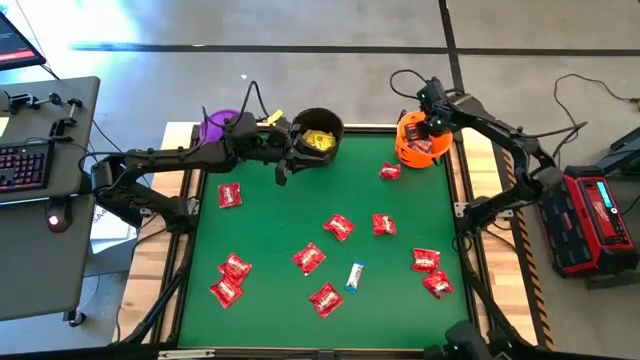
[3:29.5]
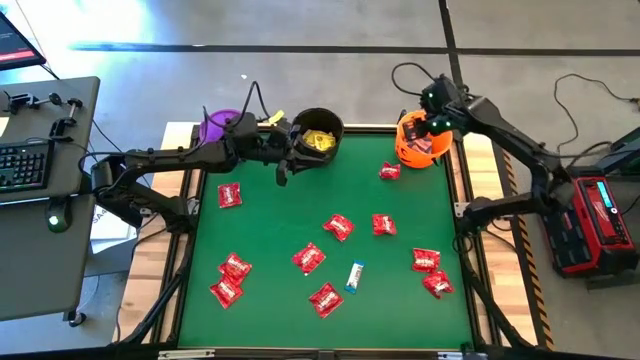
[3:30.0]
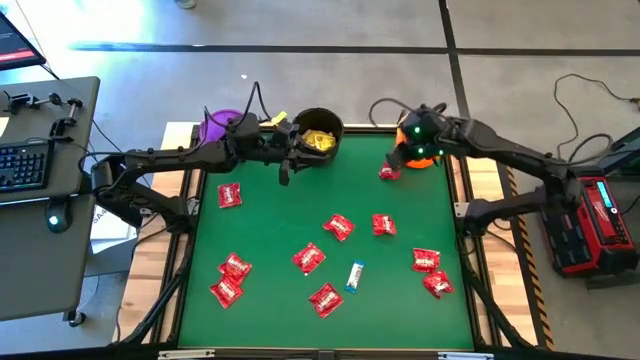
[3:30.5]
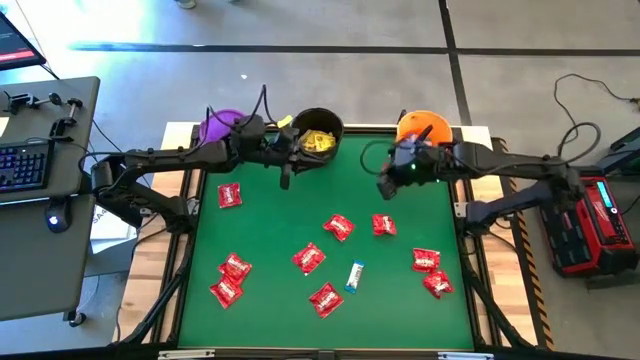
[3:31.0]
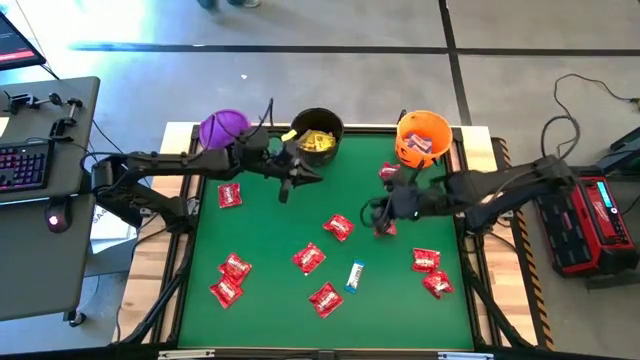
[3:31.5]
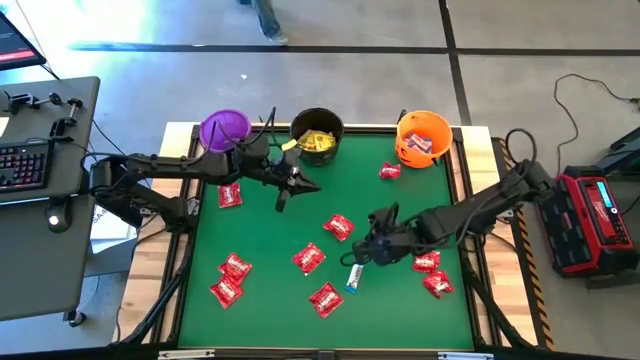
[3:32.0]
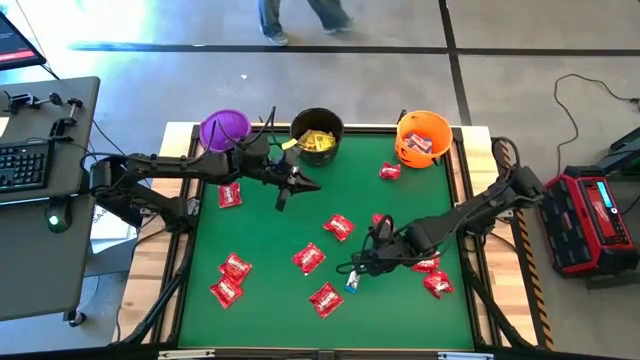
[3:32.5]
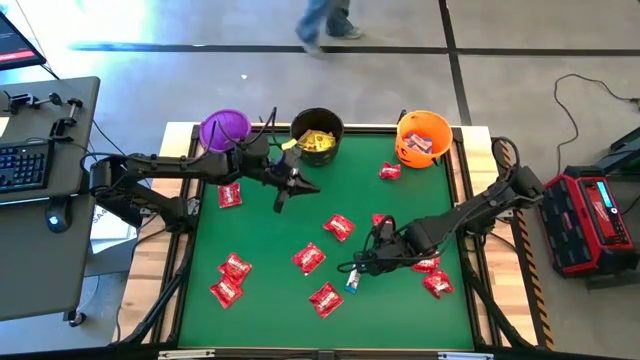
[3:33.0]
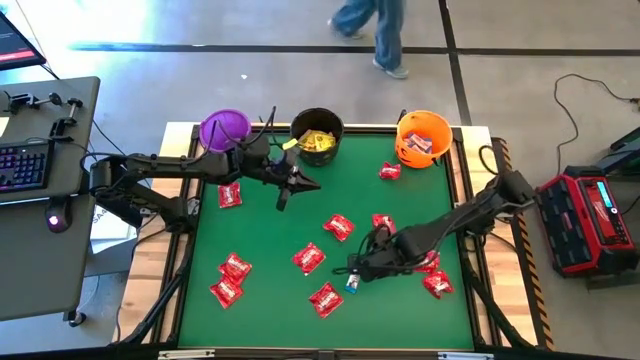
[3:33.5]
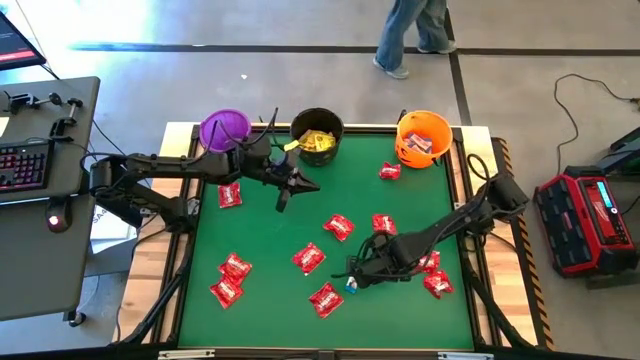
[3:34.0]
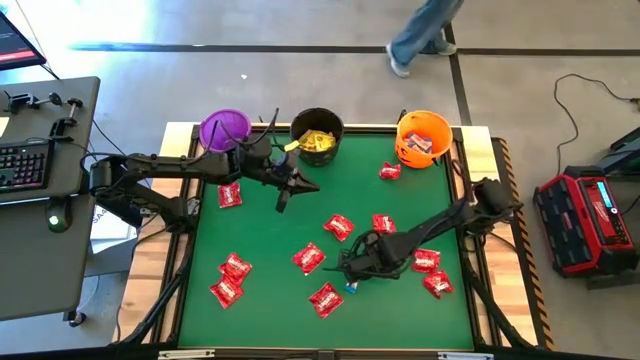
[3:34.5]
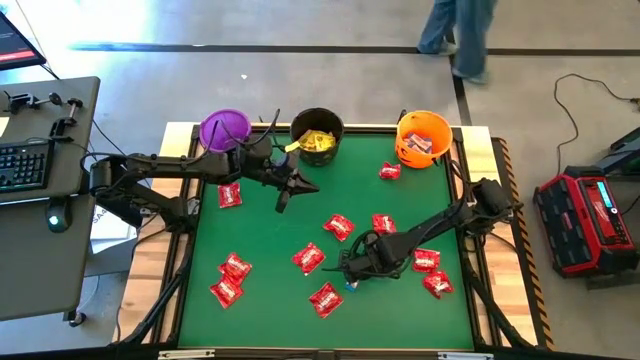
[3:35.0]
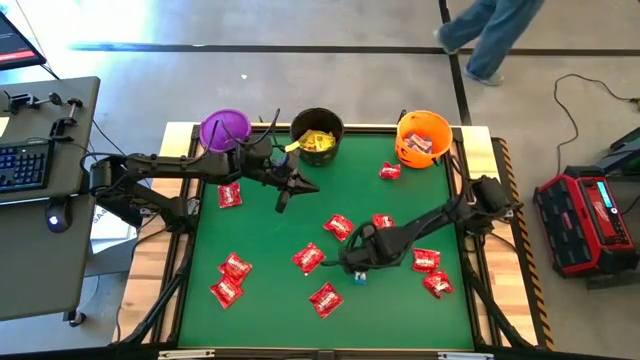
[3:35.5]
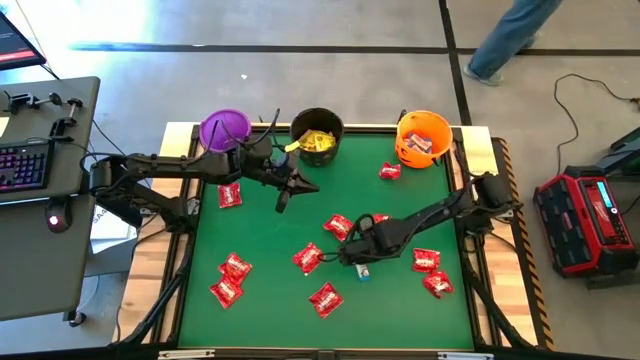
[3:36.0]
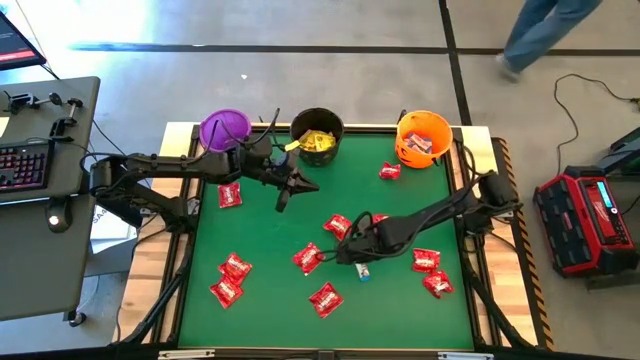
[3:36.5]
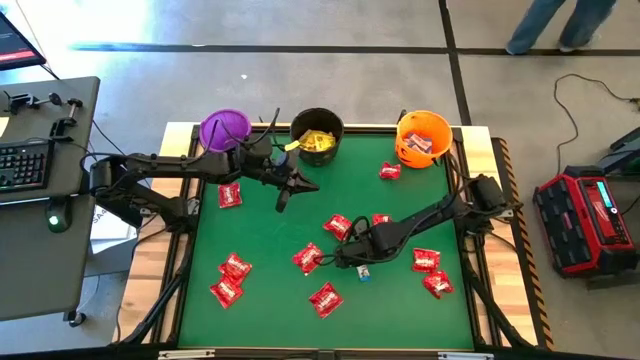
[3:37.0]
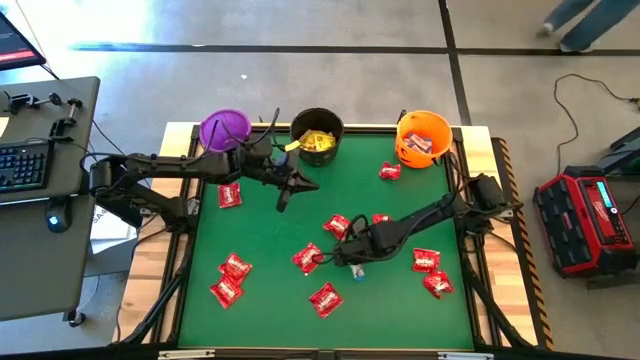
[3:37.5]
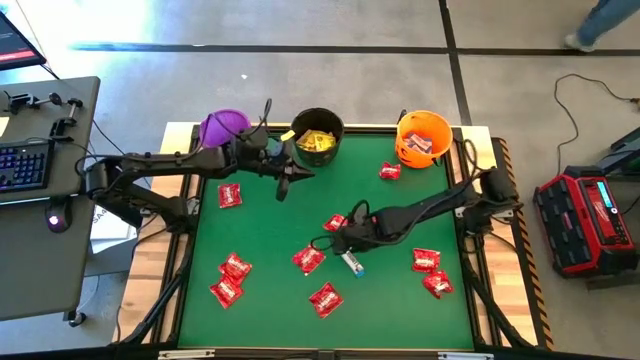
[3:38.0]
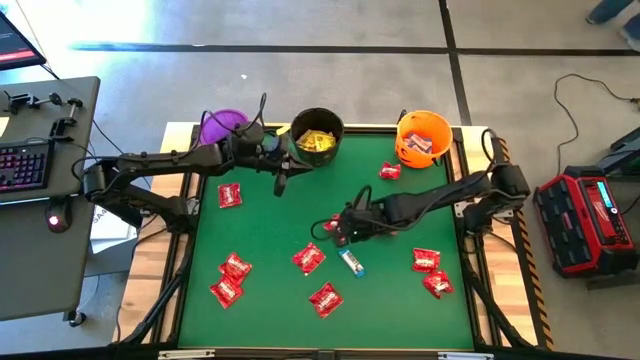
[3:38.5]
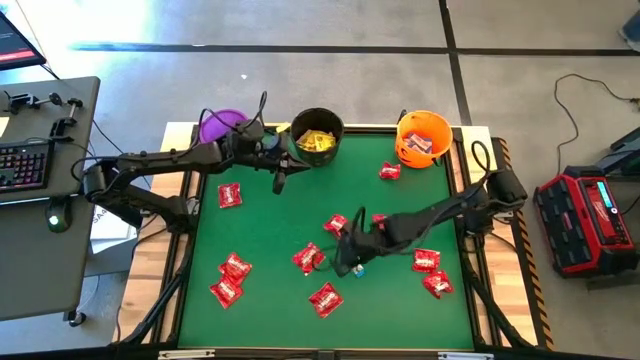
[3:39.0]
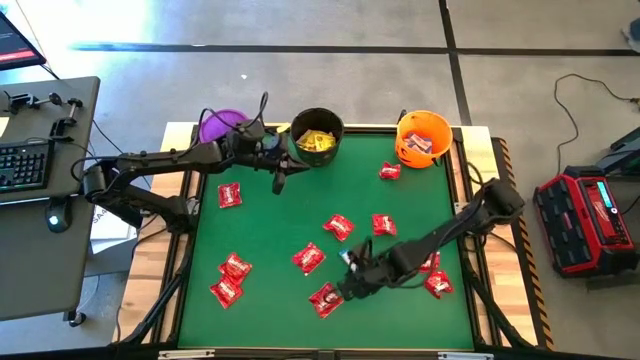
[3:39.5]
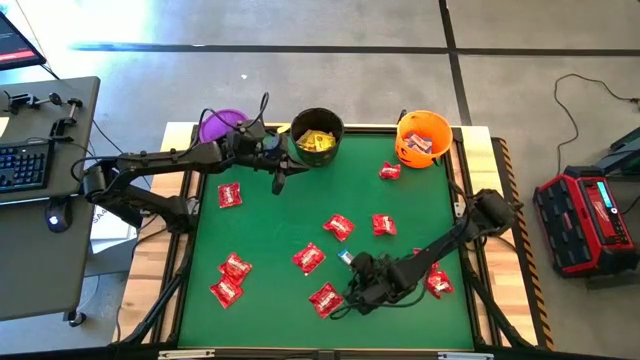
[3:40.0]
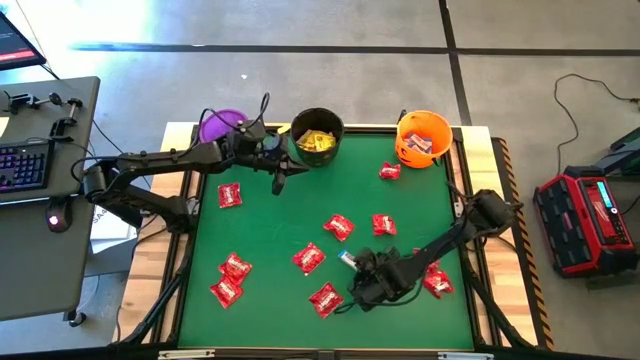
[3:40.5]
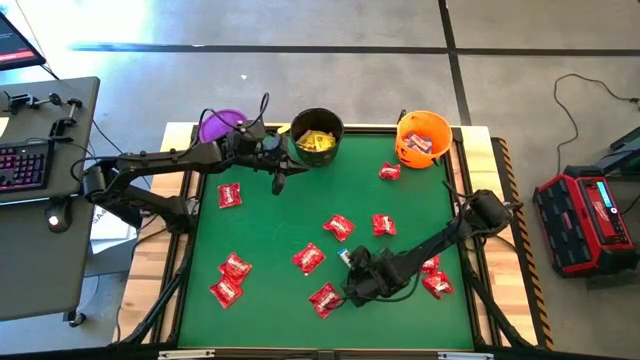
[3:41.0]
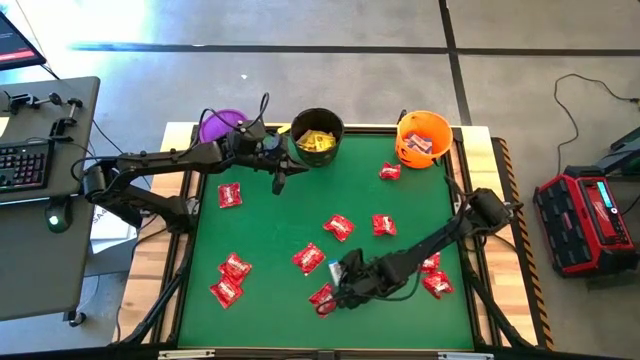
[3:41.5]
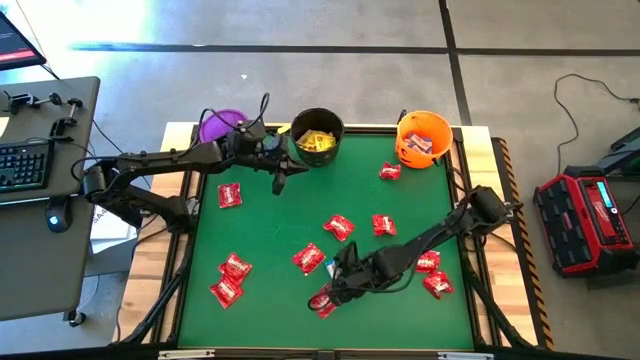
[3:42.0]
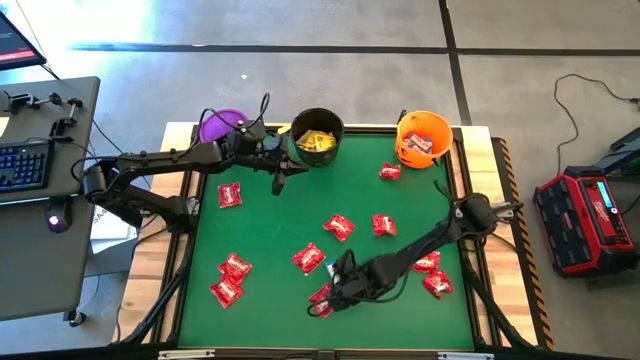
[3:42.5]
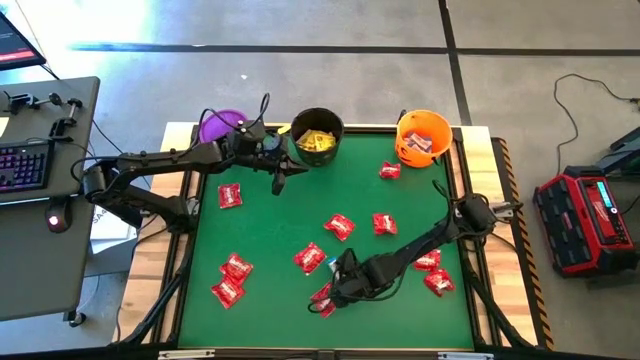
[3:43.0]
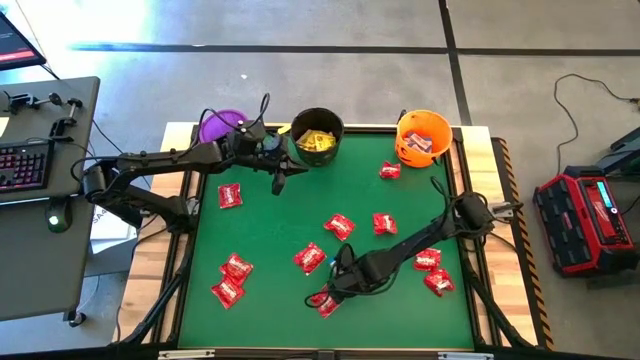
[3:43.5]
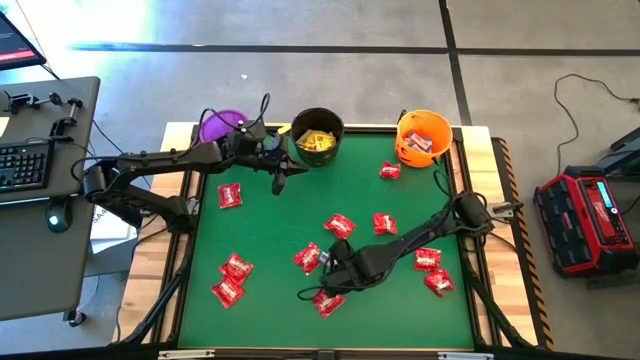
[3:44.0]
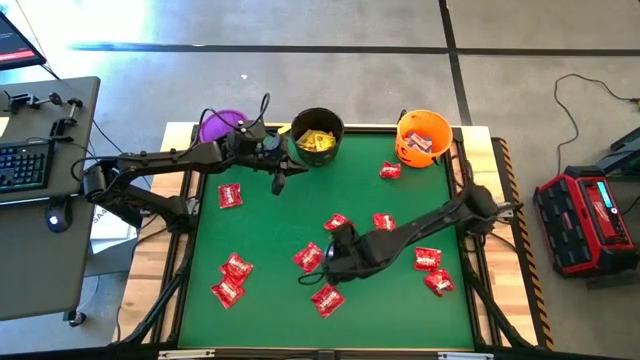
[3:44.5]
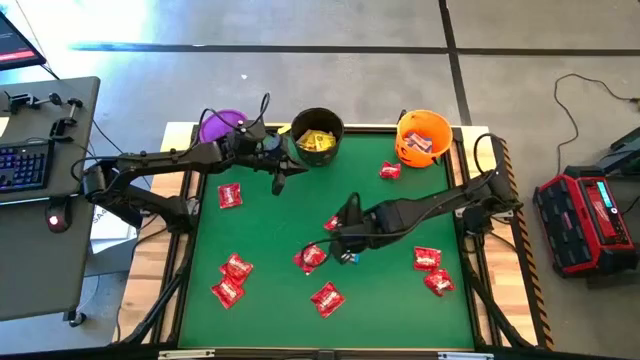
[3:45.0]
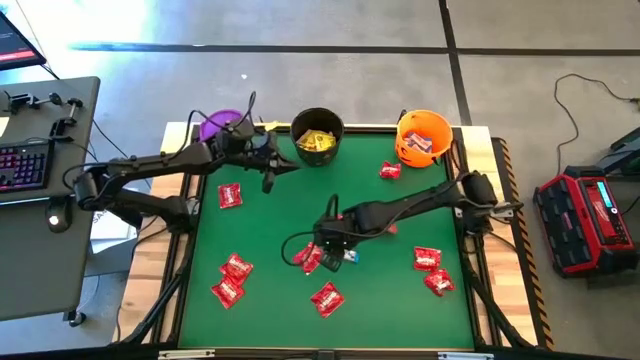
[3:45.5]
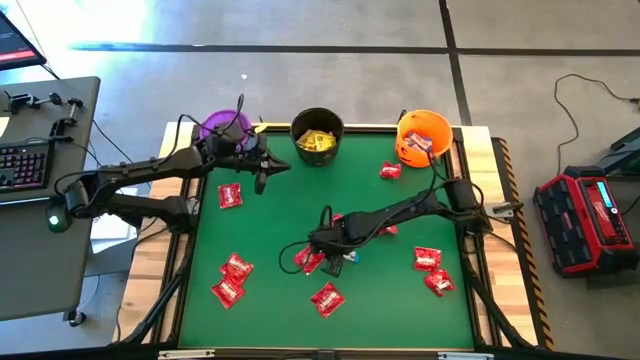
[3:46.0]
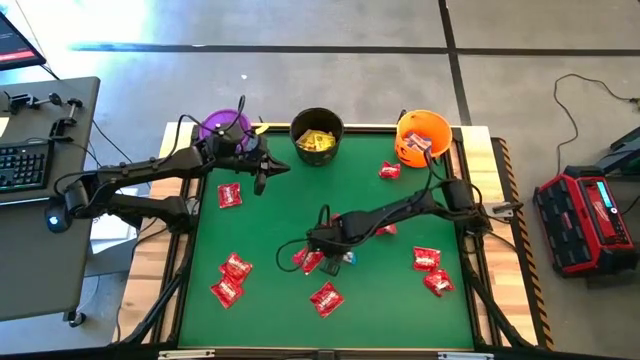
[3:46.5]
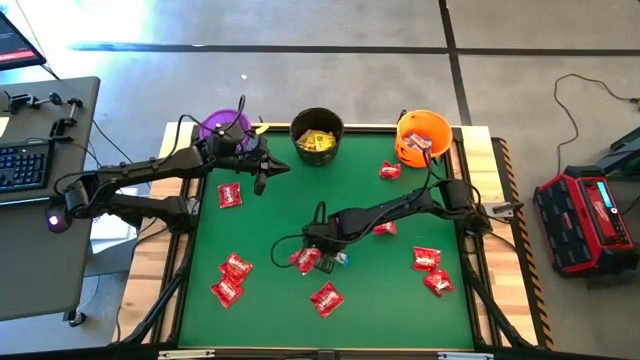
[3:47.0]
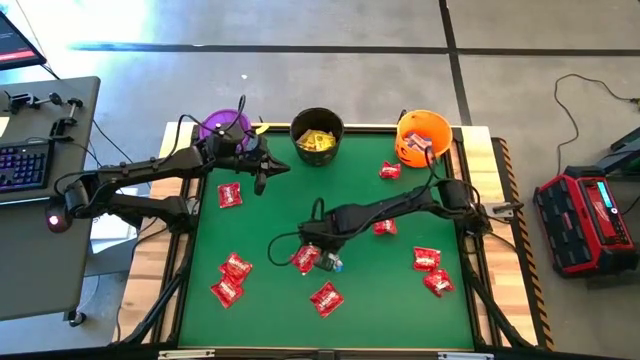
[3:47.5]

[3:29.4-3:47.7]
Task: Sort candy by brand, put in halloween buckets
Put the blue chocolate bar into the orange bucket

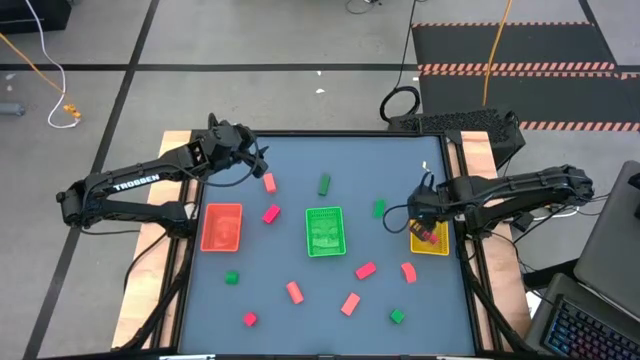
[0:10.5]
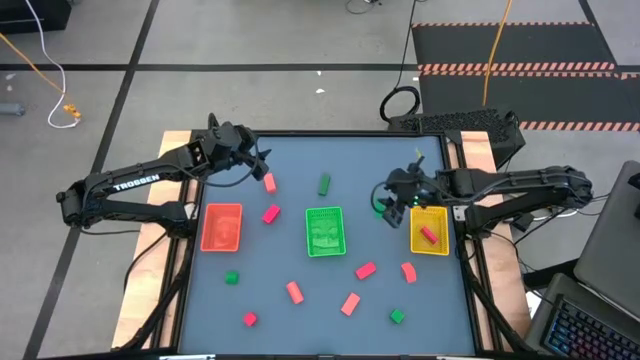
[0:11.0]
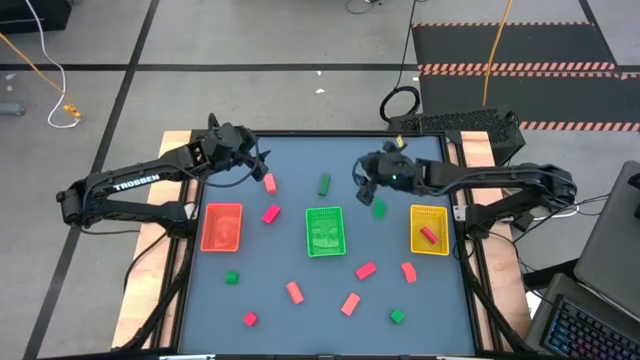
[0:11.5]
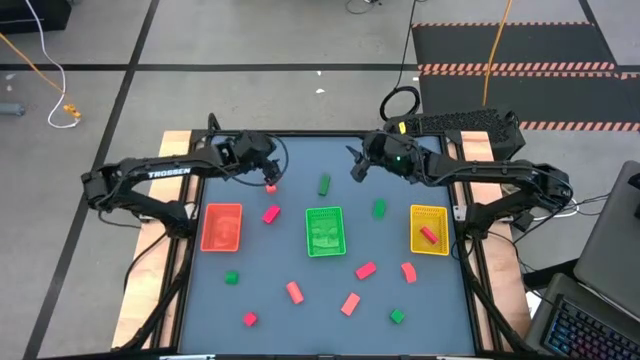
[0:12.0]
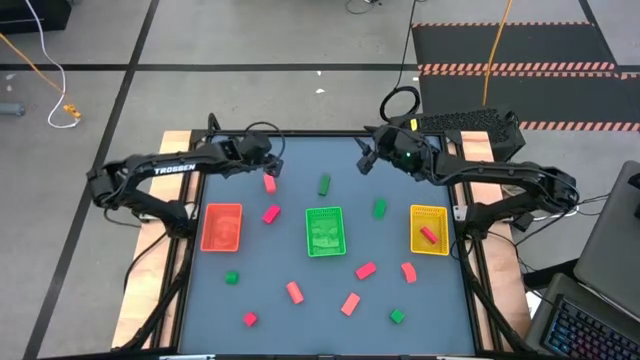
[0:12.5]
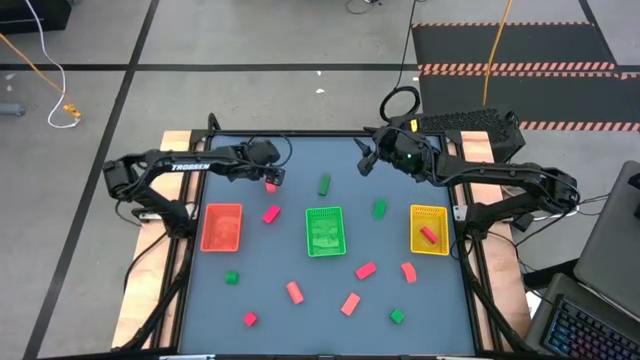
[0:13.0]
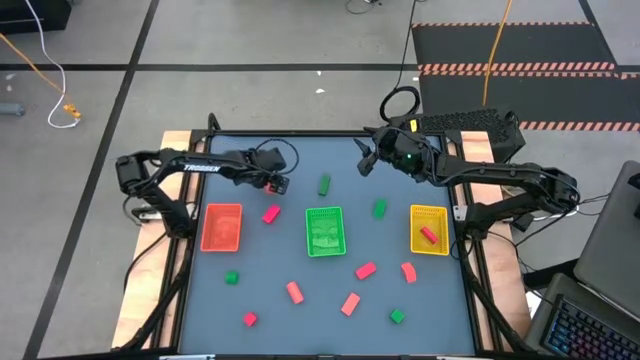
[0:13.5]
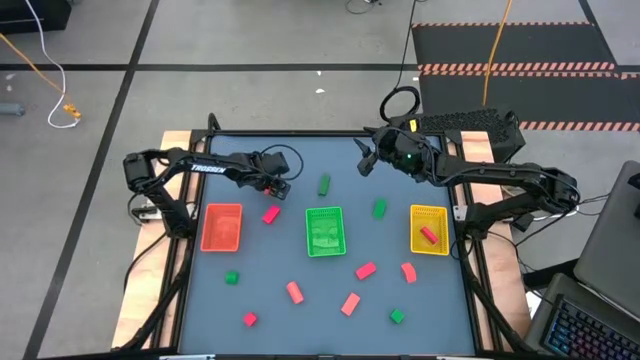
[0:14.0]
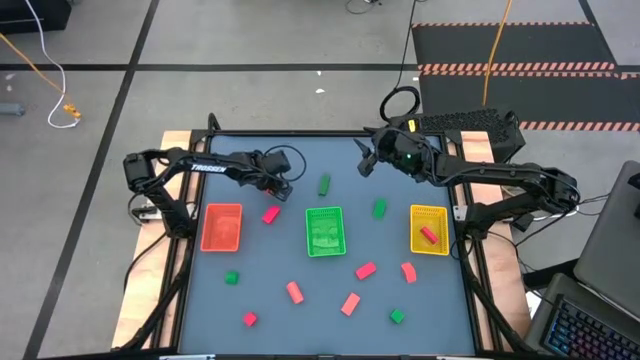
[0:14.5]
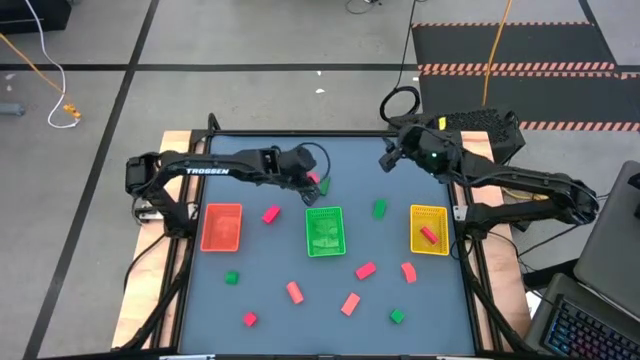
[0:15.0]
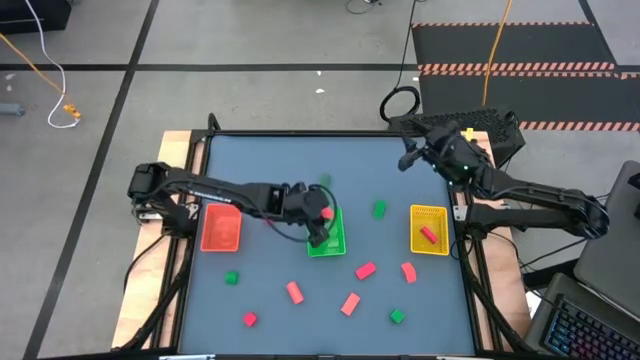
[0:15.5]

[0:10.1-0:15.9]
Task: Sort & place blocks by color
Put the orange block into the green bin
